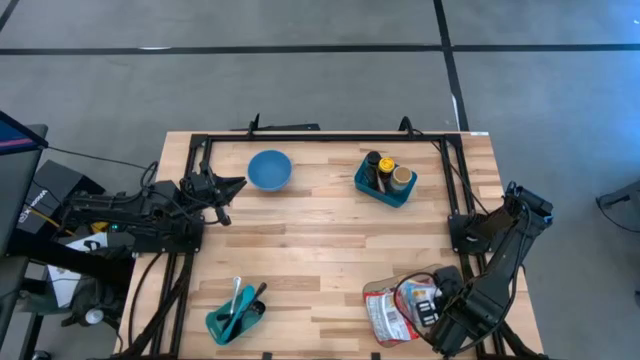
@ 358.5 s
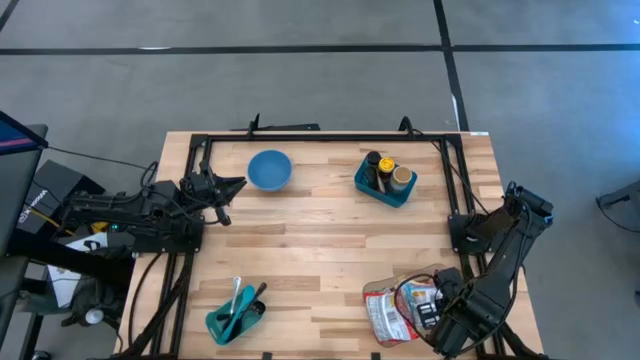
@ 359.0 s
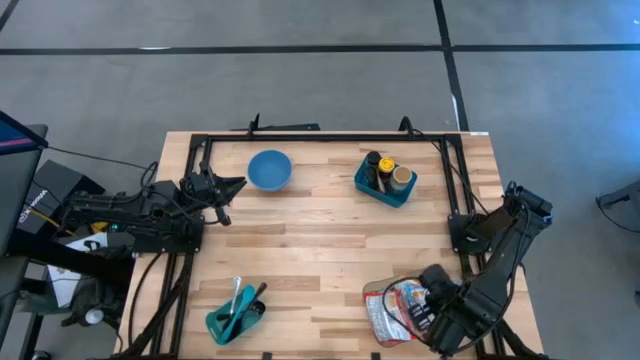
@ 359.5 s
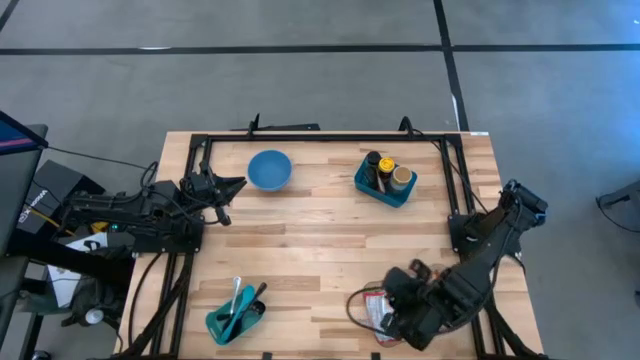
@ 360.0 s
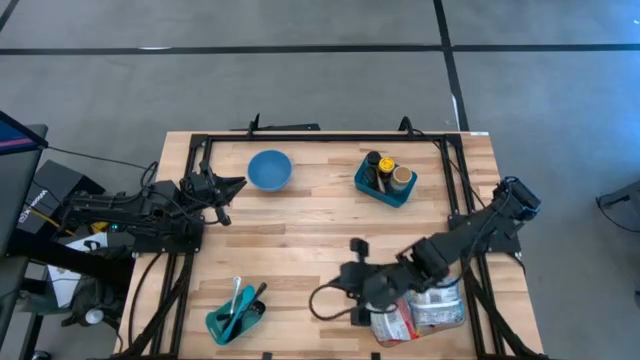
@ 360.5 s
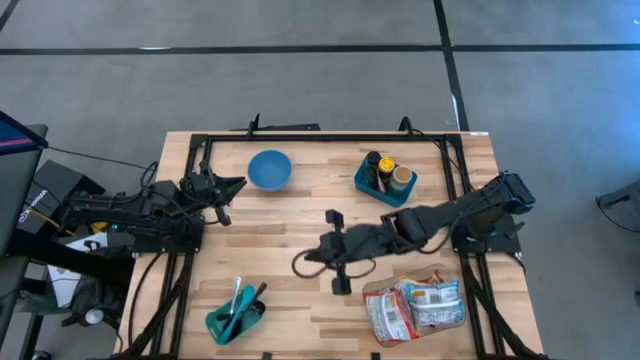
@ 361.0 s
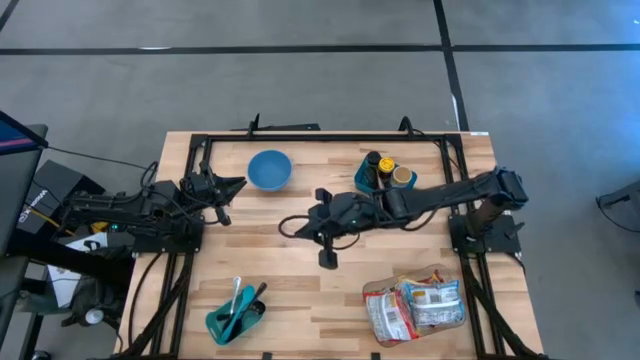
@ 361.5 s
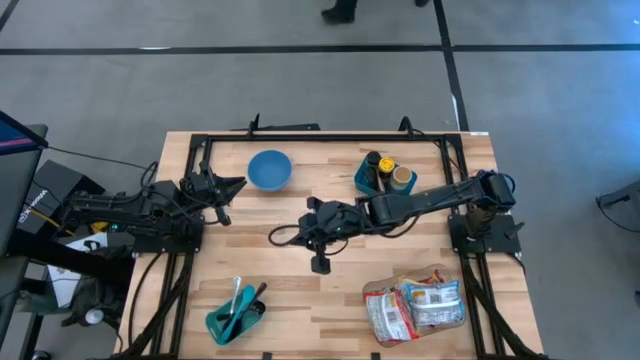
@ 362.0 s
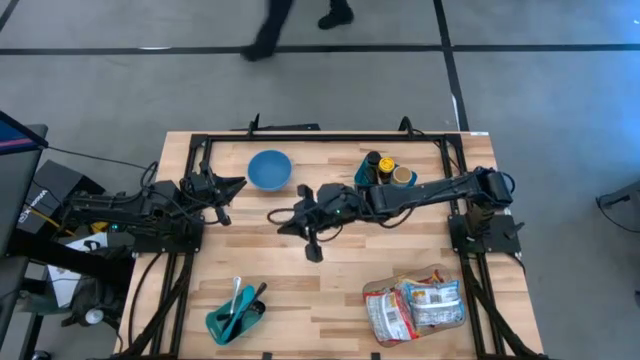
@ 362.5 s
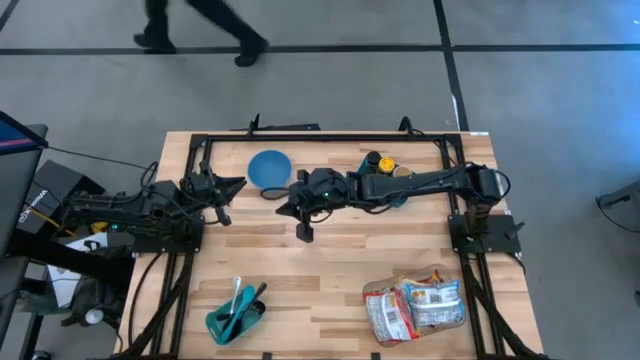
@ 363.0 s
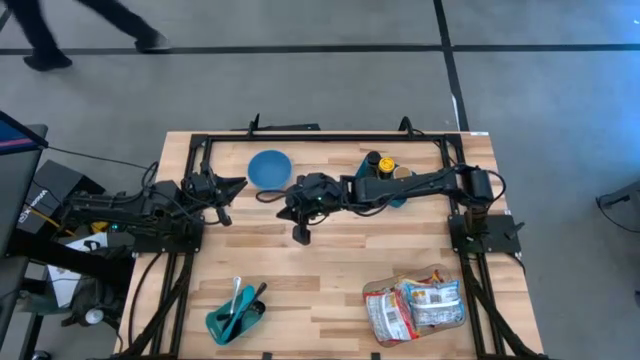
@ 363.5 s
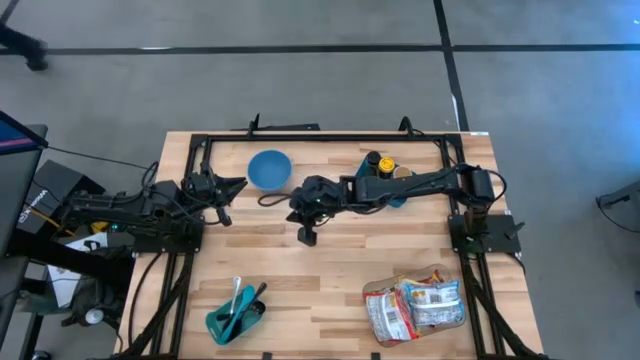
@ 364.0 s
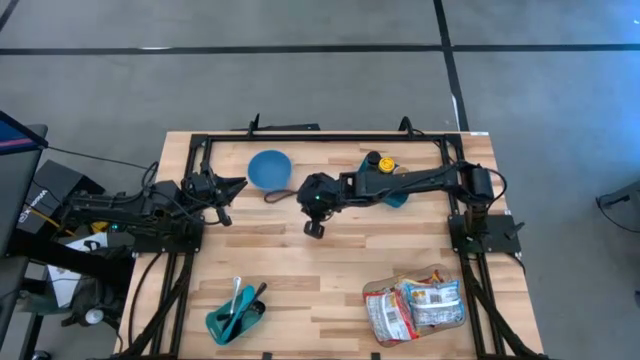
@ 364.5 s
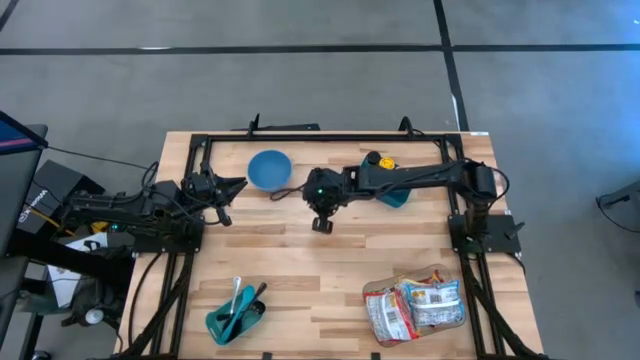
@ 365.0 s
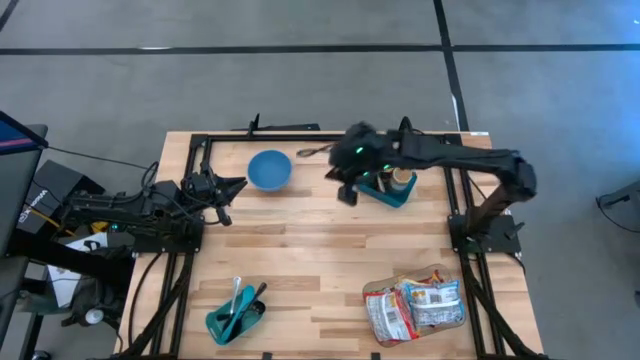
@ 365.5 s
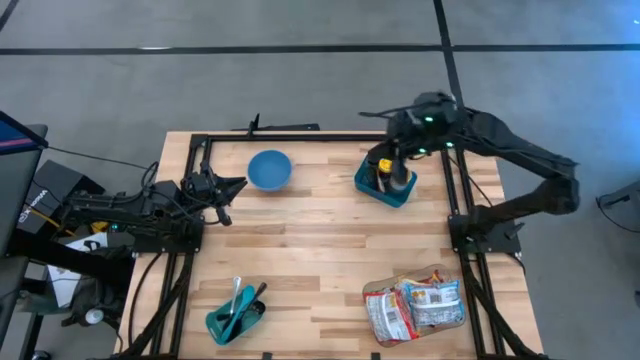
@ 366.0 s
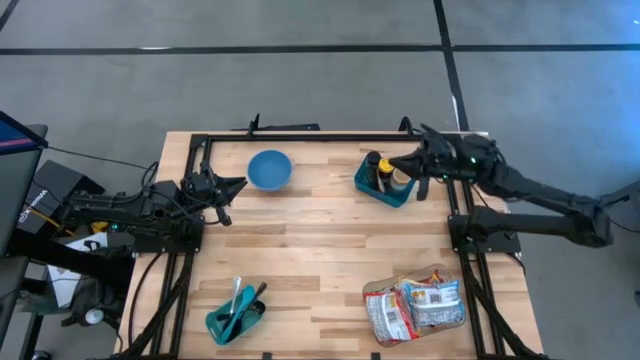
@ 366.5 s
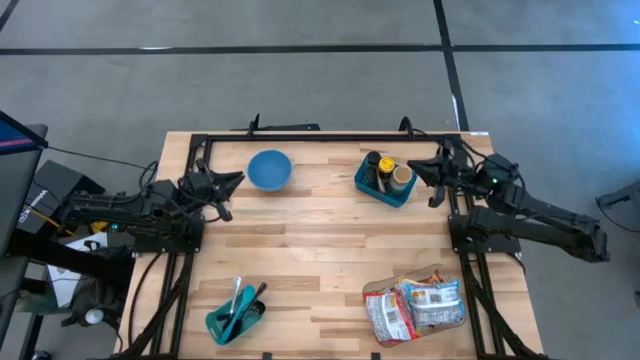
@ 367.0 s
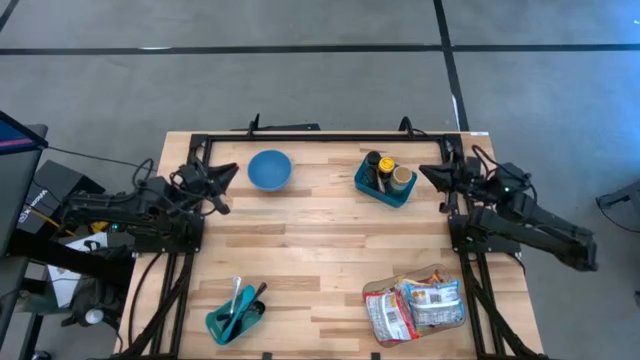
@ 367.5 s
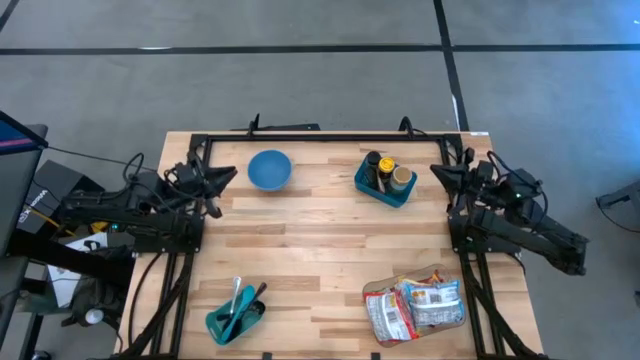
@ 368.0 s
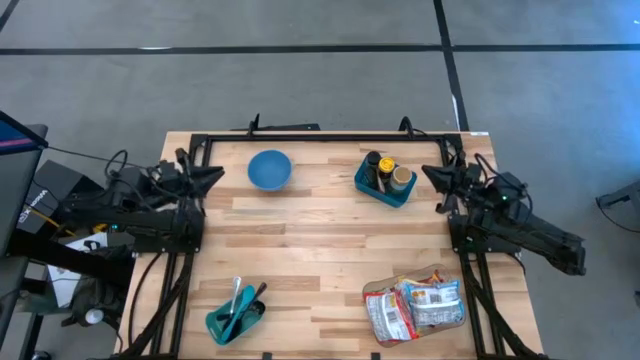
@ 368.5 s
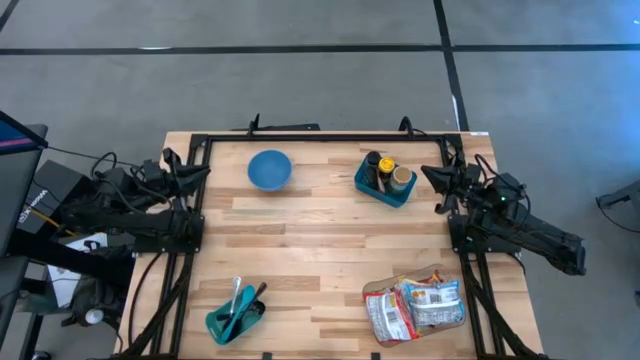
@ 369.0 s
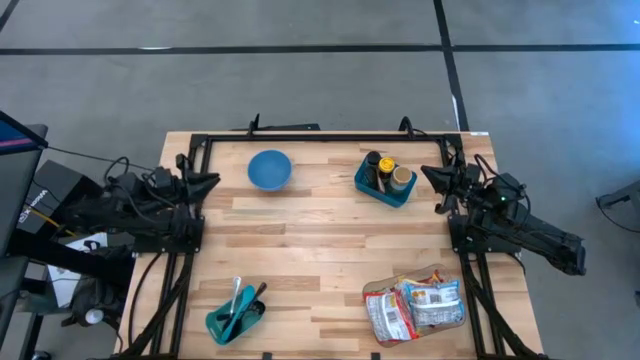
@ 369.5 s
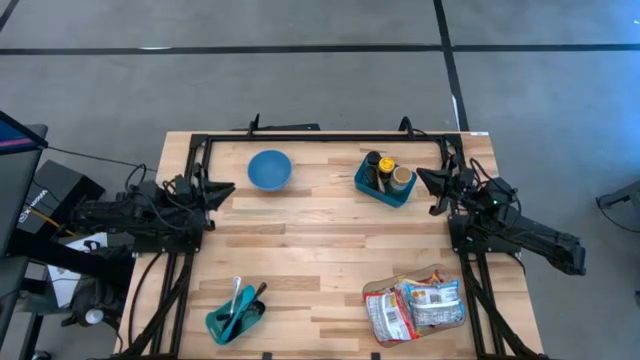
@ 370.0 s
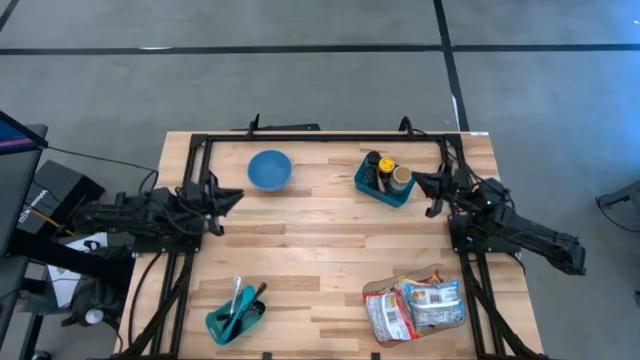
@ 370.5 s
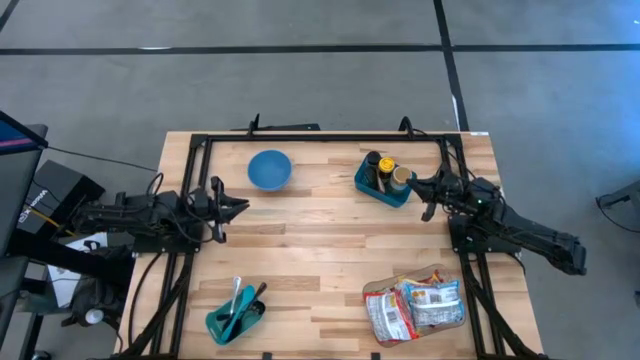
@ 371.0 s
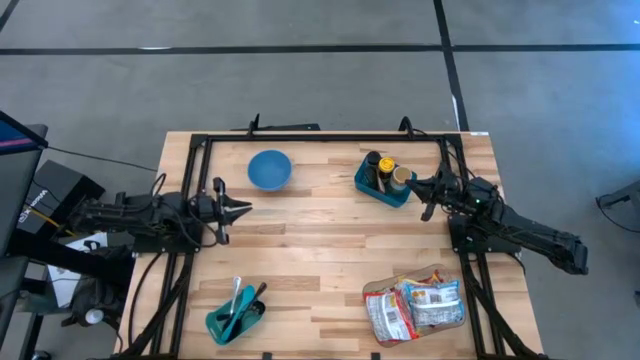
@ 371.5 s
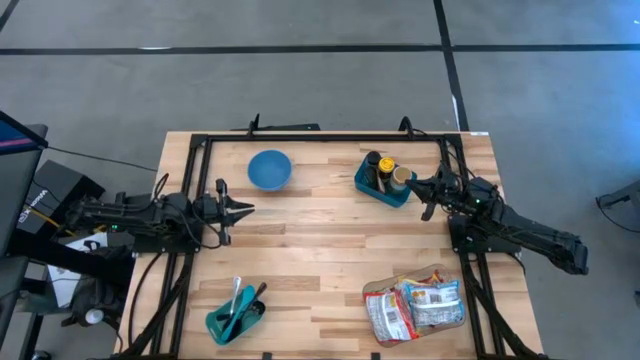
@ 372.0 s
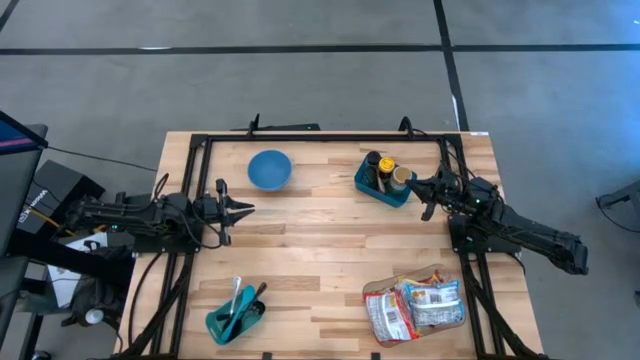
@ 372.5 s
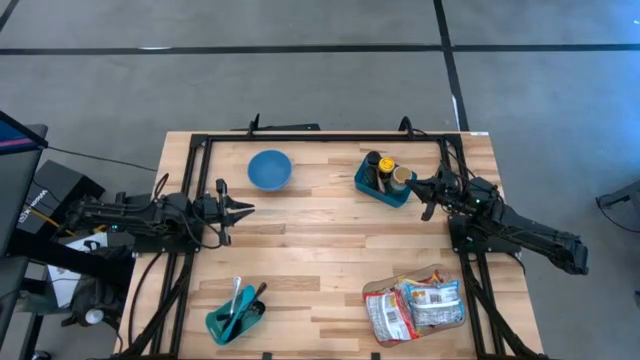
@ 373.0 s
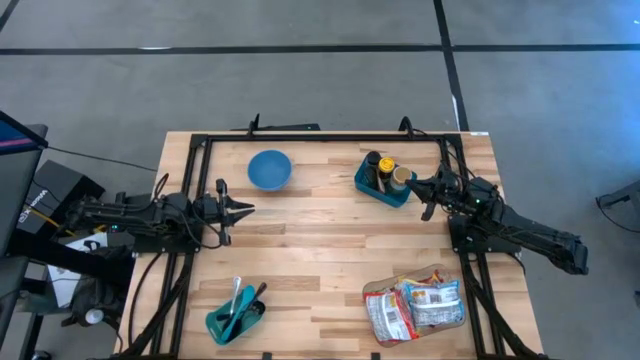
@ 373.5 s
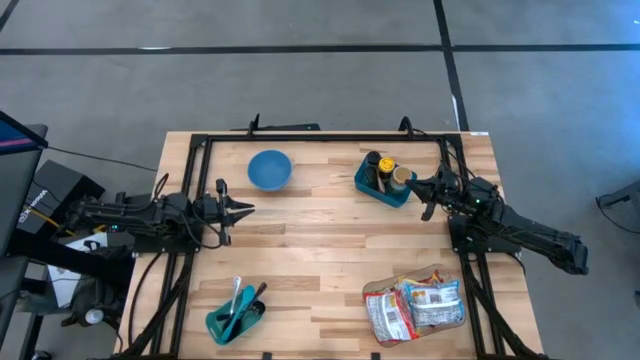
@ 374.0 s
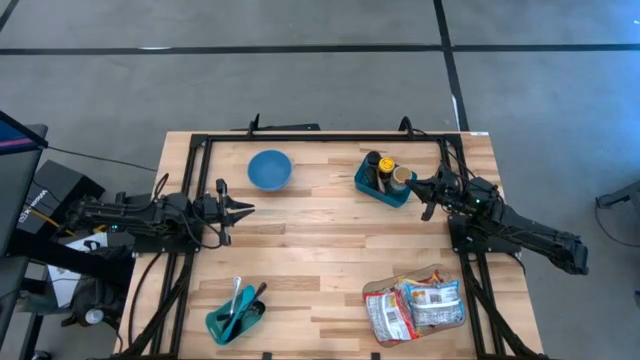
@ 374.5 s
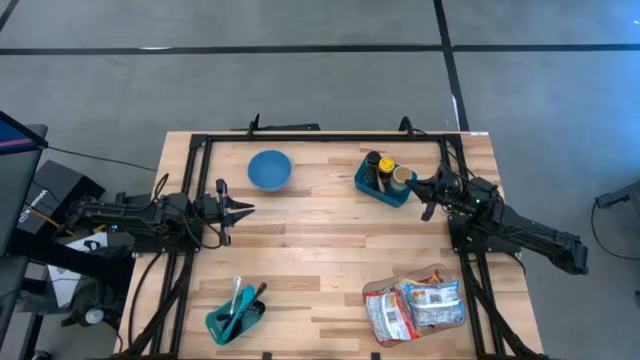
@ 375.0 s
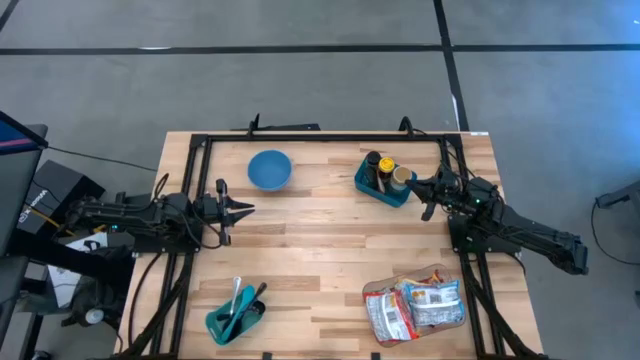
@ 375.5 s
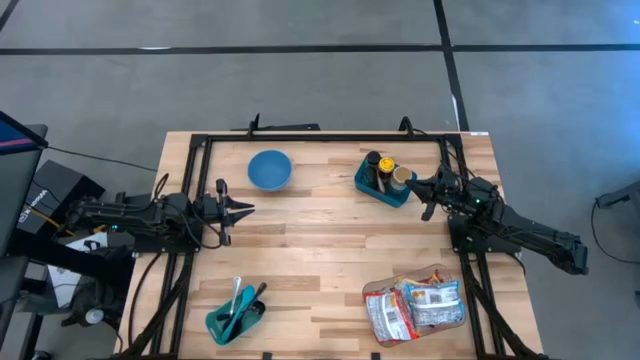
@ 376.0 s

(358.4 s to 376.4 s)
Task: Pick & Place Food Item
Return to Home Position

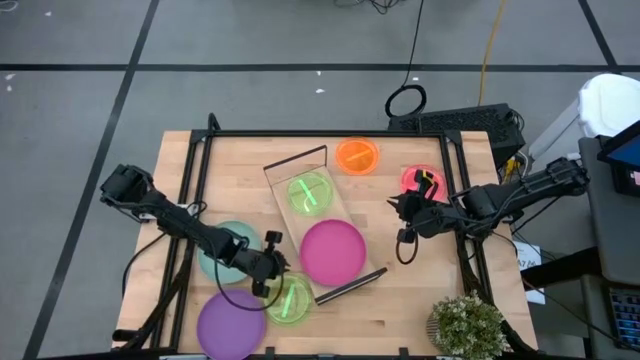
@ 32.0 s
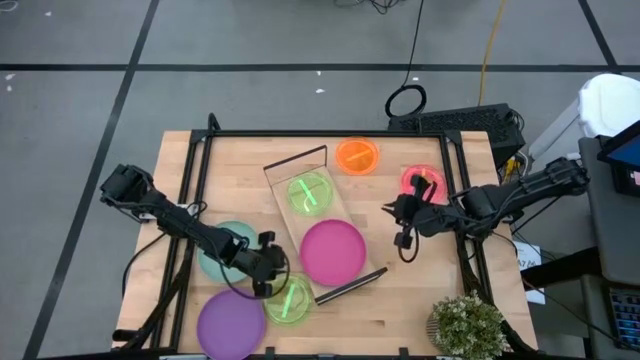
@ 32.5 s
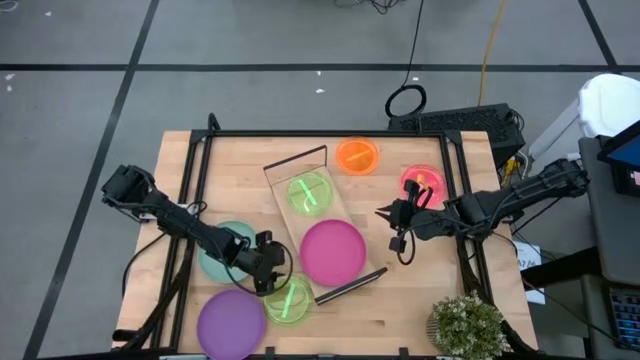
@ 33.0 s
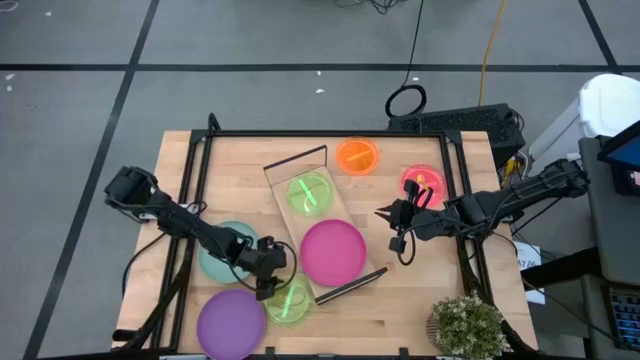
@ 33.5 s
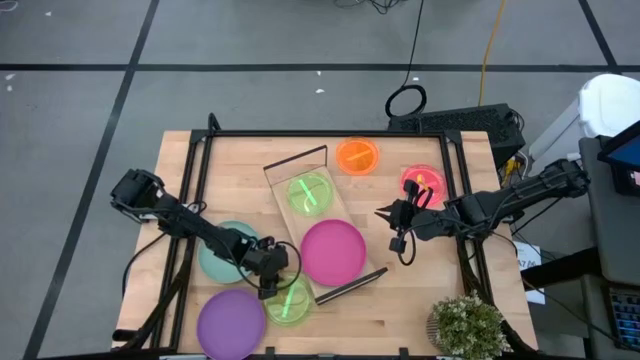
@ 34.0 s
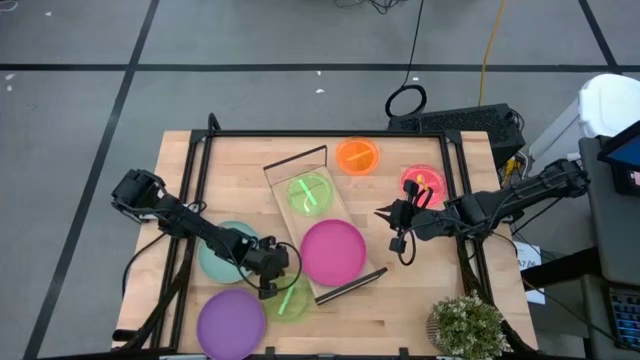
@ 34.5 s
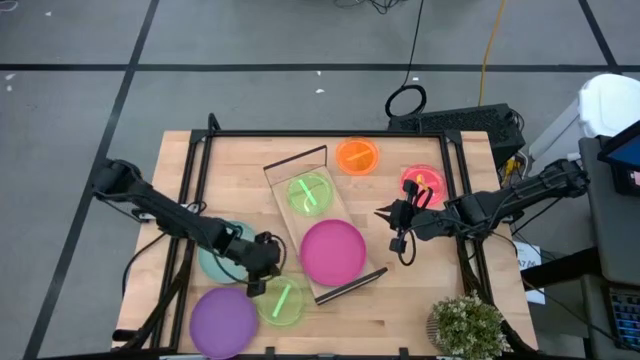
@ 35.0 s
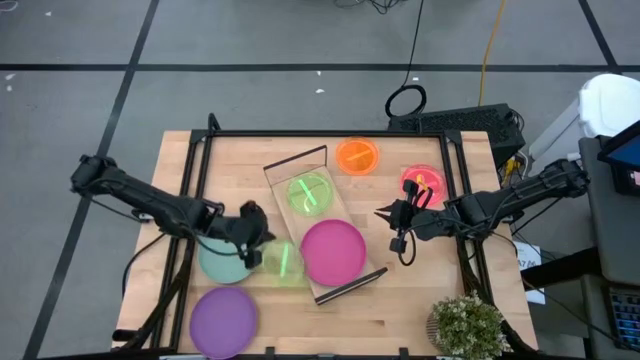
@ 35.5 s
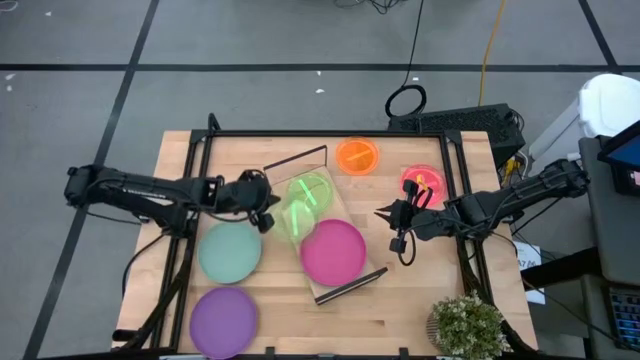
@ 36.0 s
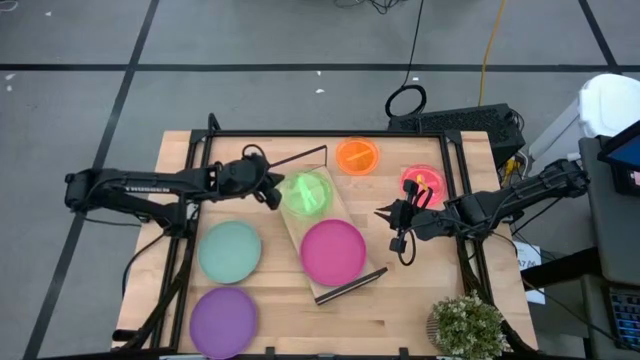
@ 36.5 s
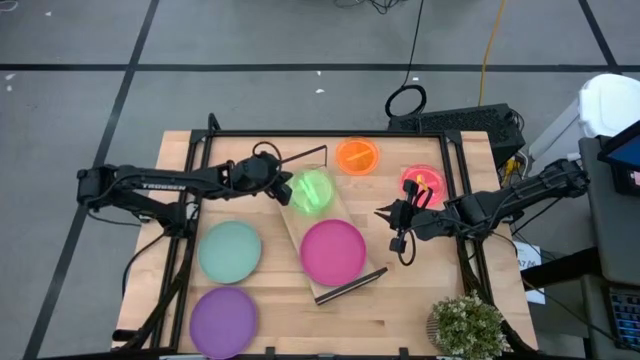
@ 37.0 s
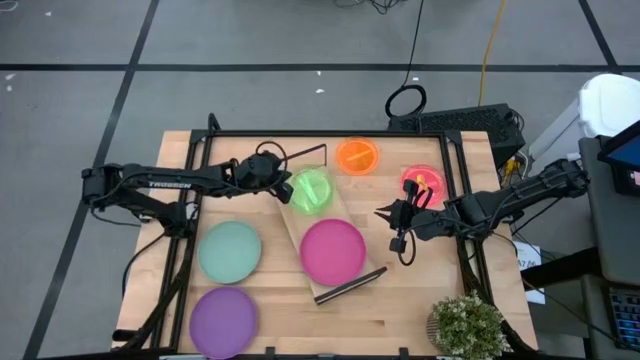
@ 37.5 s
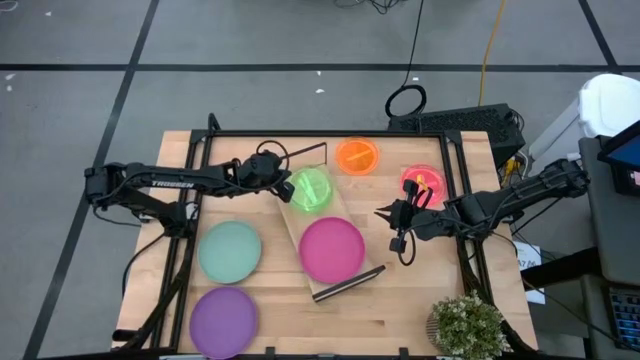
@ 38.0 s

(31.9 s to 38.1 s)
Task: Place and stack plates onto a shelf
Stack the yellow green plate on the yellow green plate on the shelf
